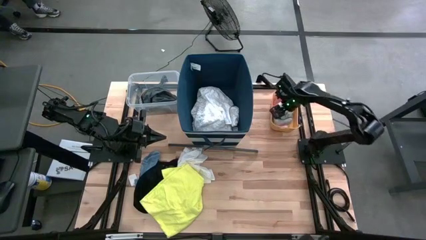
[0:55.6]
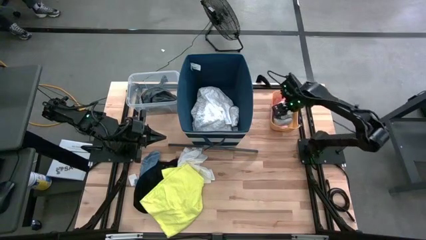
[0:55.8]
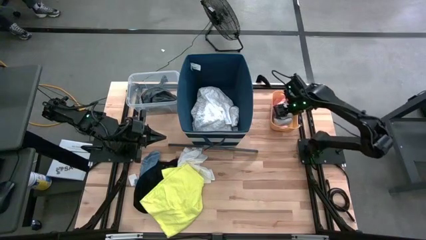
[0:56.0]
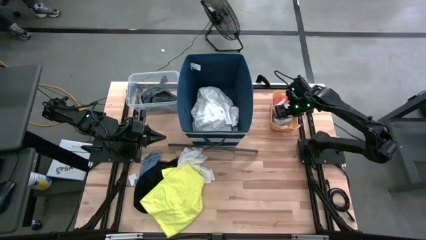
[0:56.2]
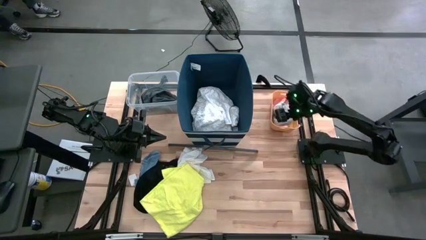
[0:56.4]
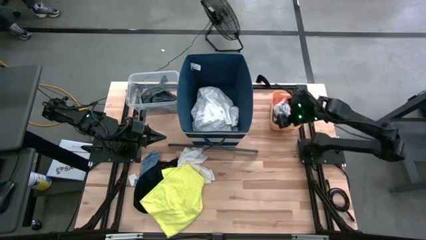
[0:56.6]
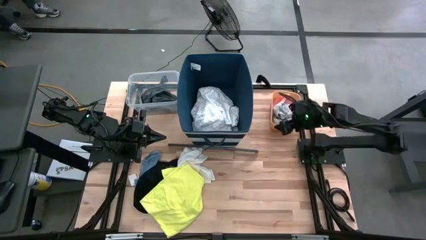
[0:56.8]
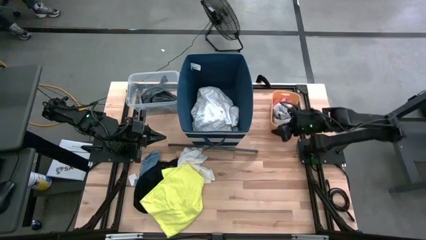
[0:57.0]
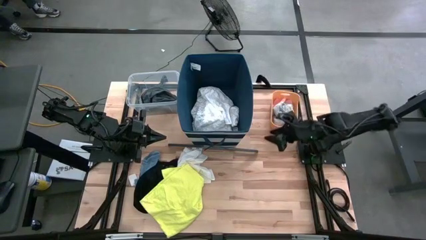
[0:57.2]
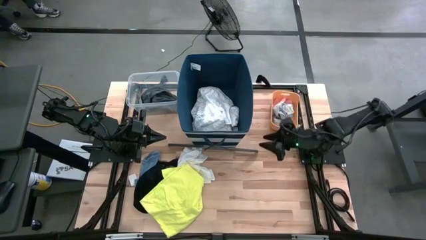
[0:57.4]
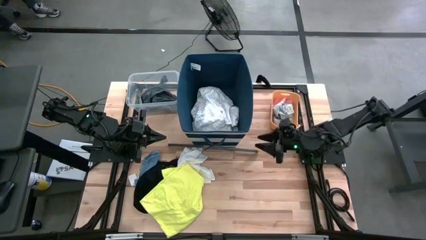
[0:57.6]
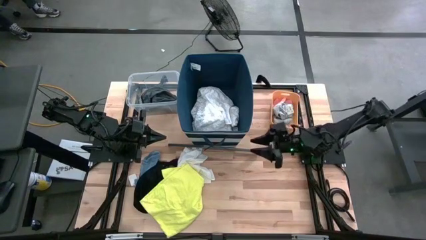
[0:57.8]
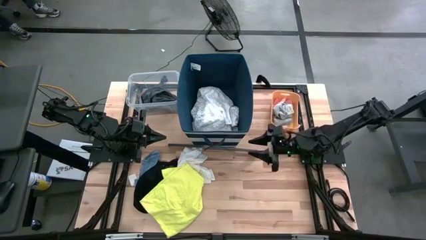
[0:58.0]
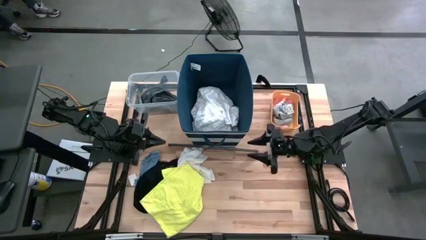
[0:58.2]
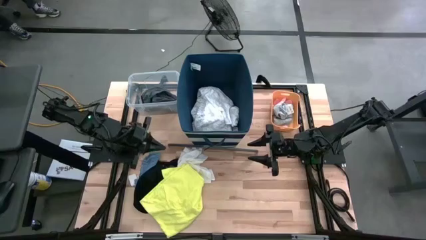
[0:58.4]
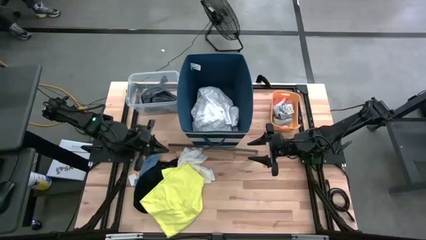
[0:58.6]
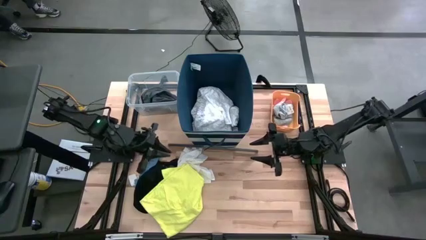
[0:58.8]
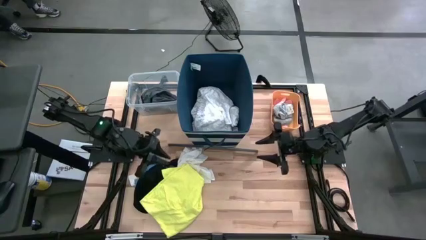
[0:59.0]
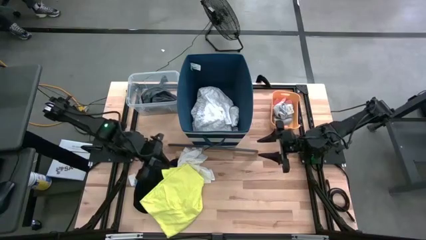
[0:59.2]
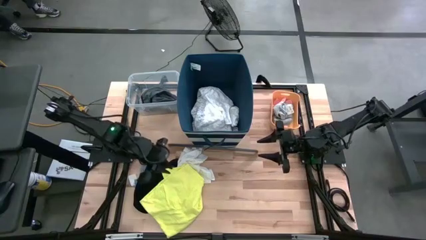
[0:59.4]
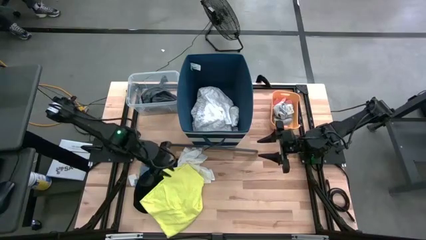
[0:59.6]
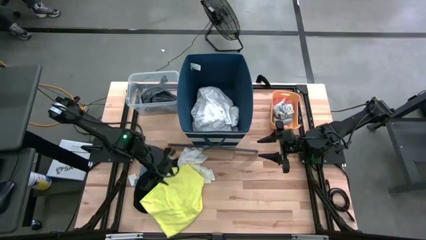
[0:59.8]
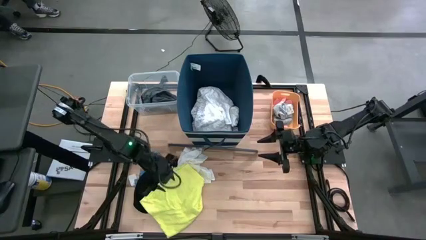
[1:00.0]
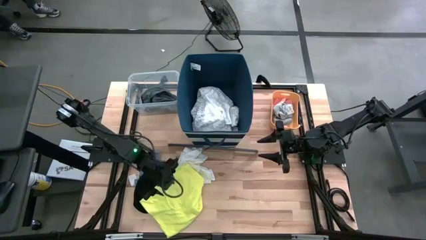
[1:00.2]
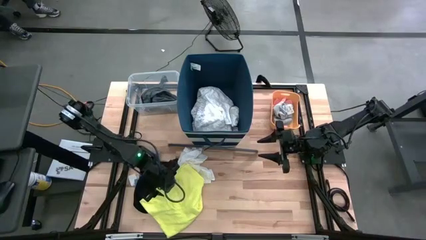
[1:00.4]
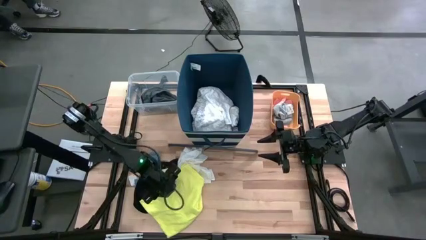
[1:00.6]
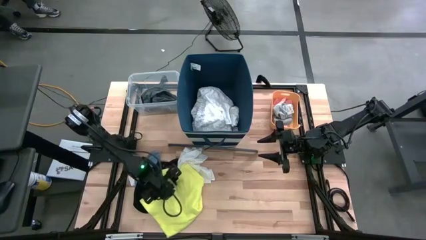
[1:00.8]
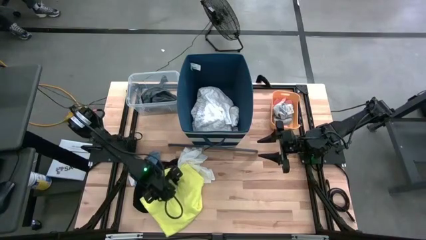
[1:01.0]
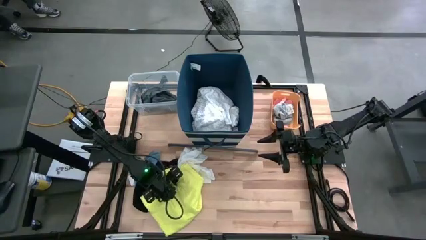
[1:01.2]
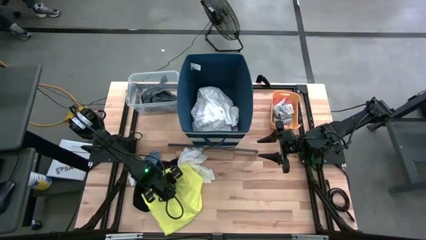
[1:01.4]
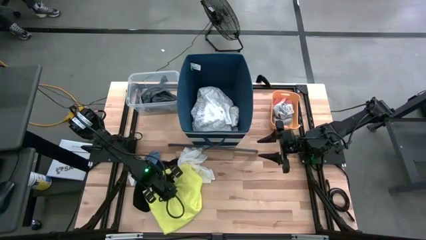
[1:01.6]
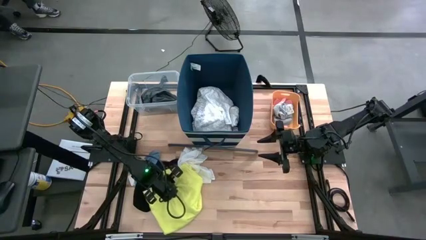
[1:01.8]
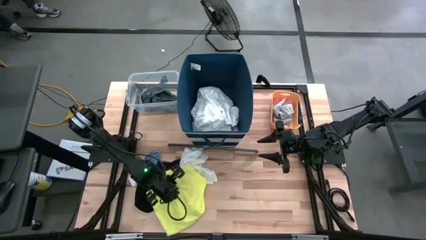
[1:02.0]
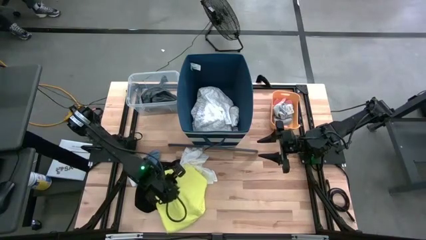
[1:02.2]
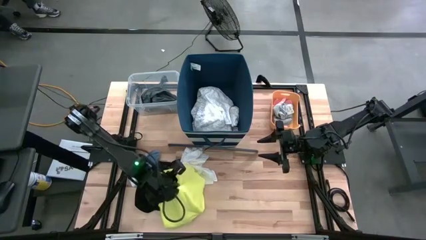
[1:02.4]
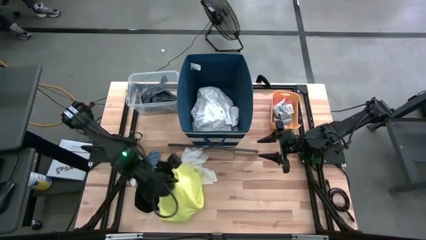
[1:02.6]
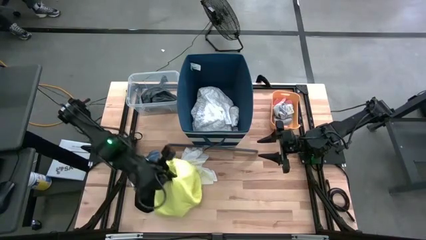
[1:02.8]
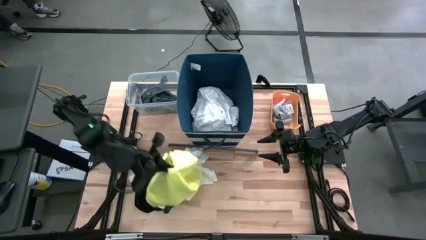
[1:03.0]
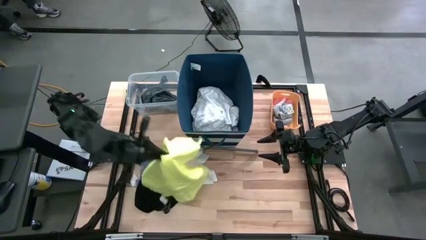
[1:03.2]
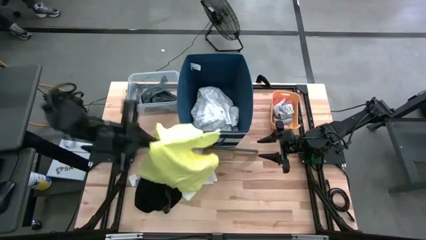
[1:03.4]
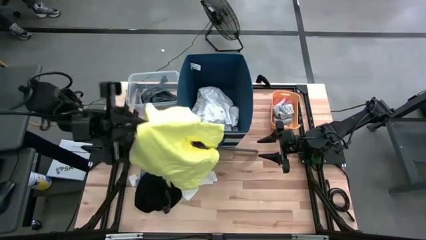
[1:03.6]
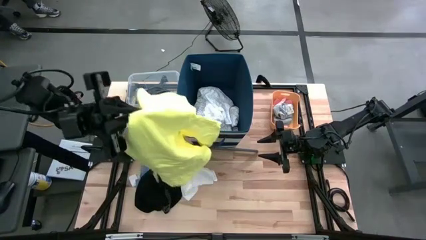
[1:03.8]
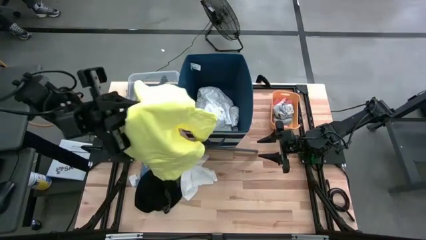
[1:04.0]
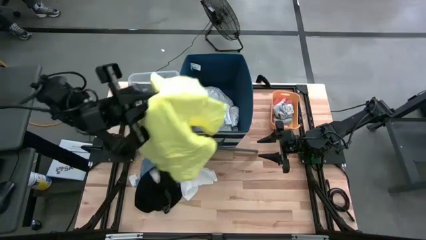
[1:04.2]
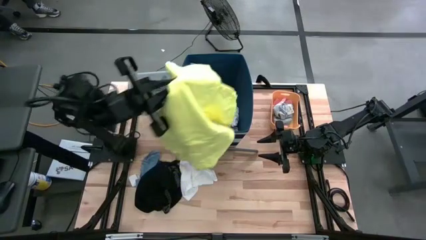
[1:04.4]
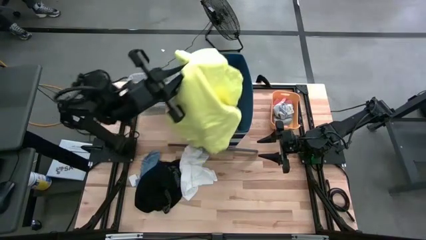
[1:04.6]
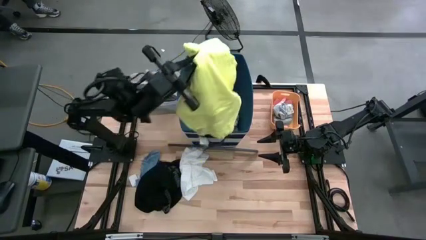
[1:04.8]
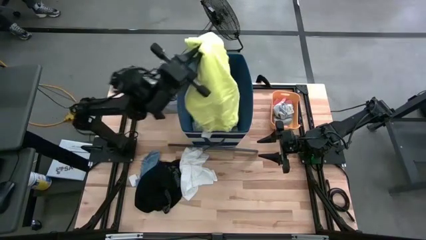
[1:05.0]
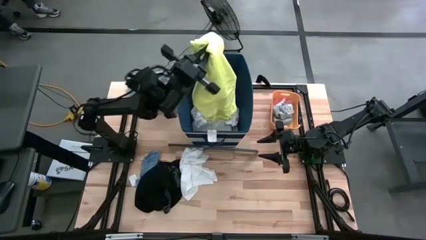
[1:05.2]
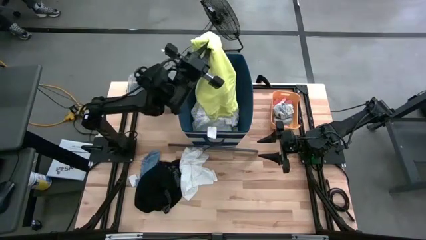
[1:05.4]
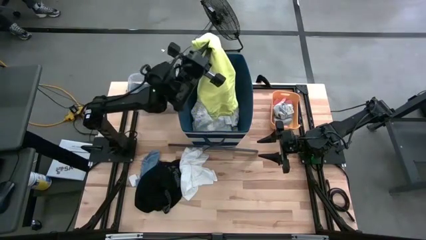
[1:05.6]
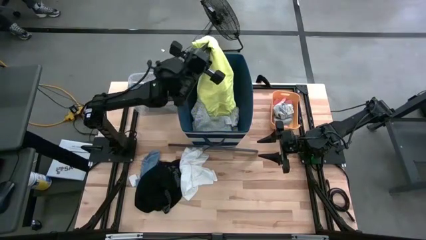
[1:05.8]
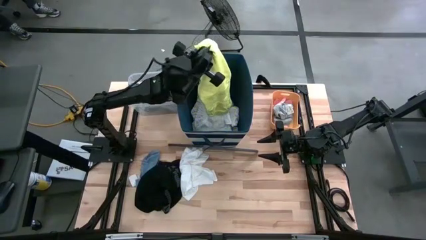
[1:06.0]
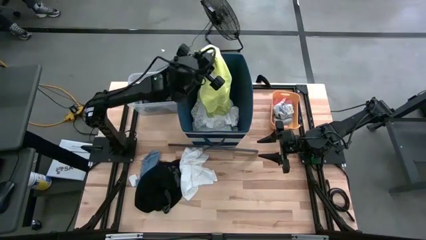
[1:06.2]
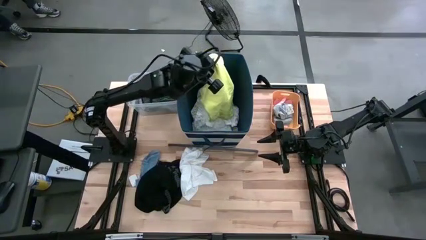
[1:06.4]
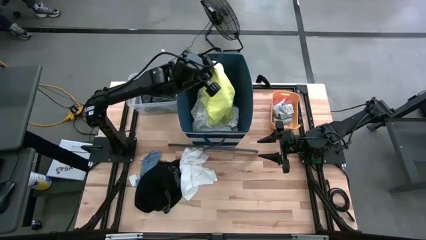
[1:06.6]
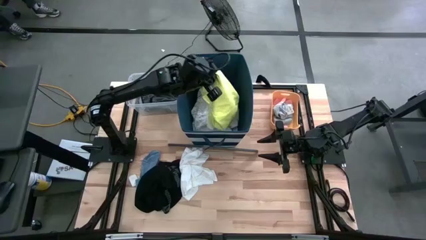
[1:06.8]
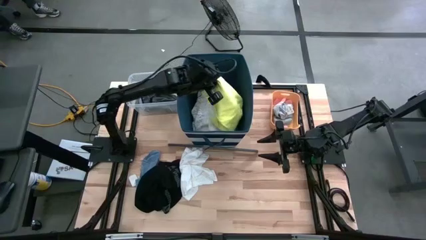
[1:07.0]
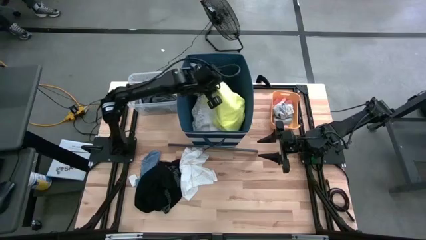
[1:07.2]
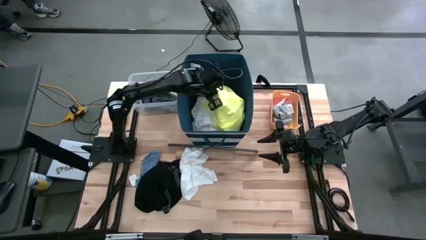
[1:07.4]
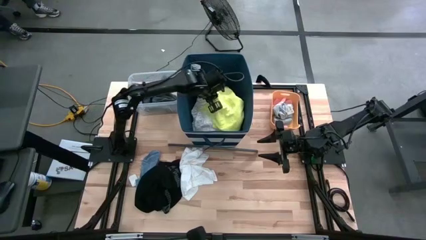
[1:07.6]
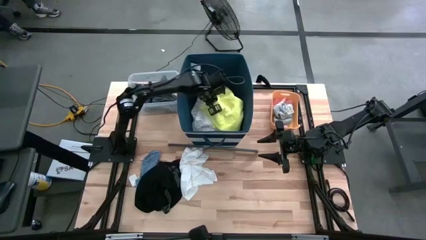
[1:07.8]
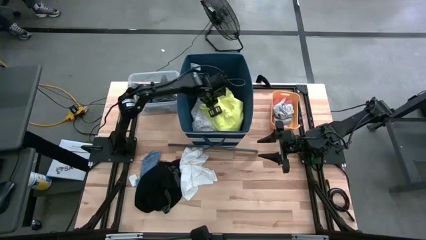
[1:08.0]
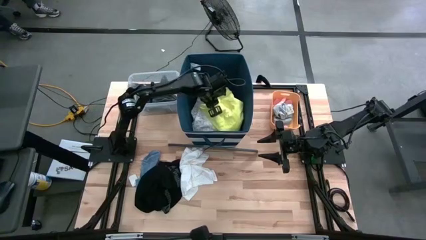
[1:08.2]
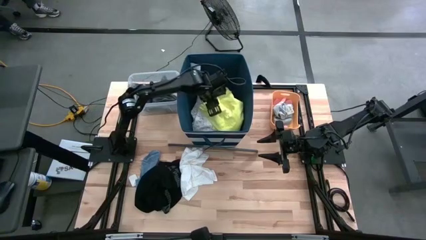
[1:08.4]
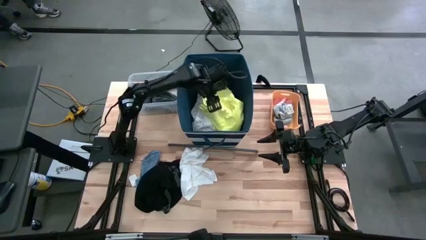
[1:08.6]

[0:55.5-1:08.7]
Task: Pick & Place Cloths
Put the yellow shirt into the blue laundry organizer

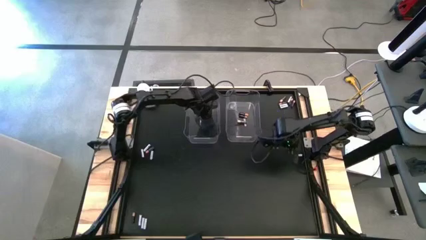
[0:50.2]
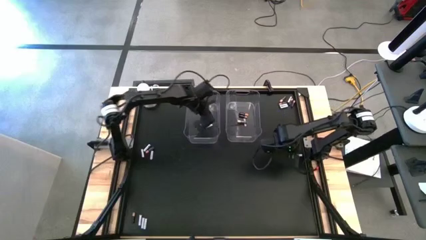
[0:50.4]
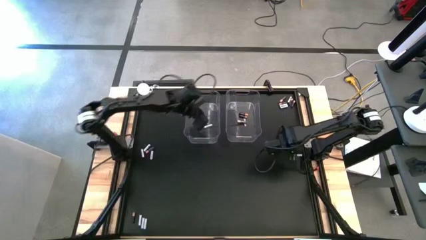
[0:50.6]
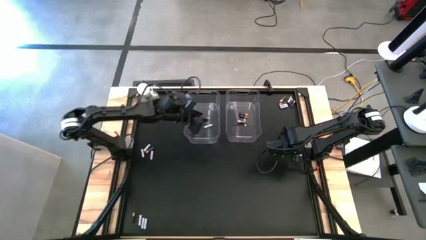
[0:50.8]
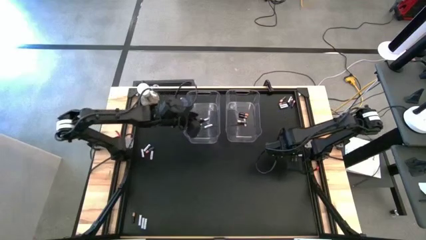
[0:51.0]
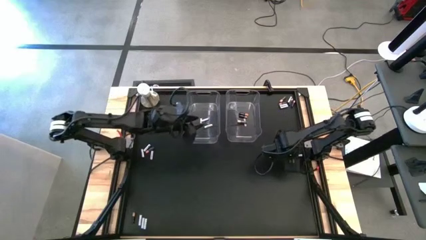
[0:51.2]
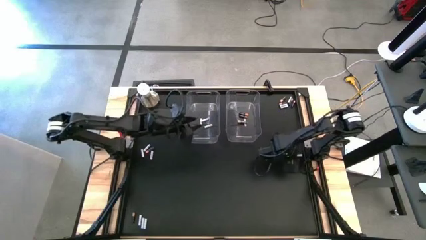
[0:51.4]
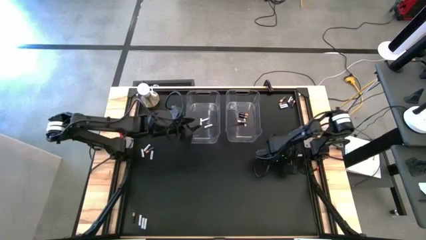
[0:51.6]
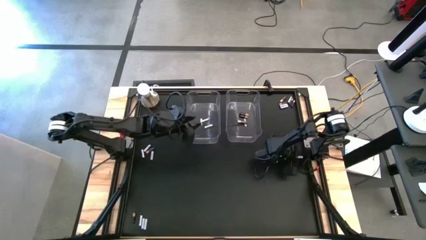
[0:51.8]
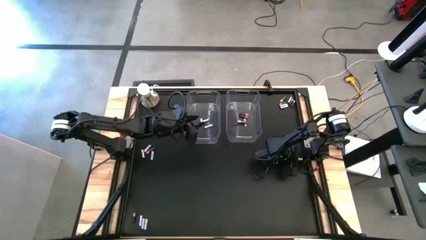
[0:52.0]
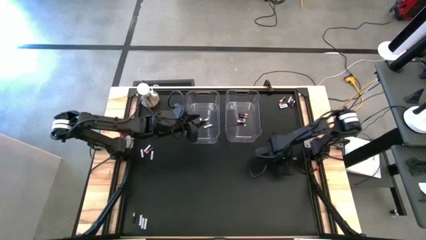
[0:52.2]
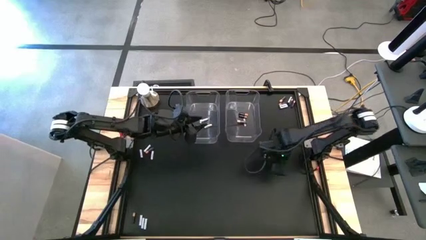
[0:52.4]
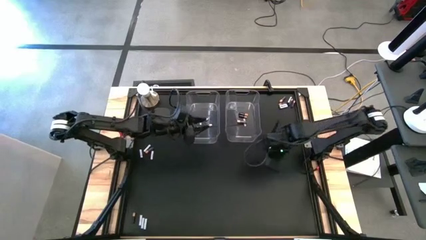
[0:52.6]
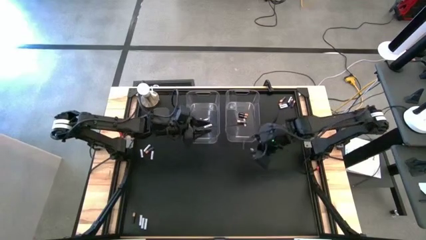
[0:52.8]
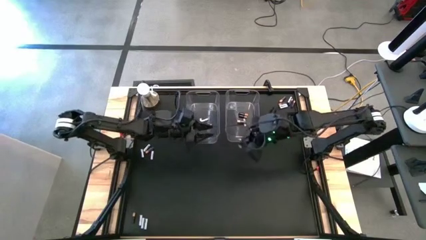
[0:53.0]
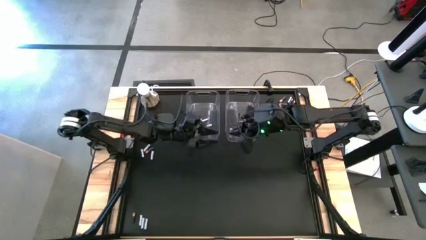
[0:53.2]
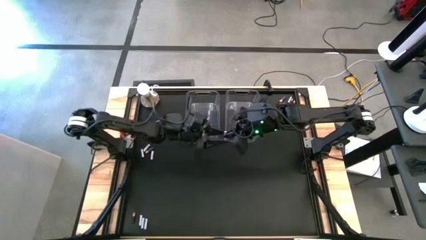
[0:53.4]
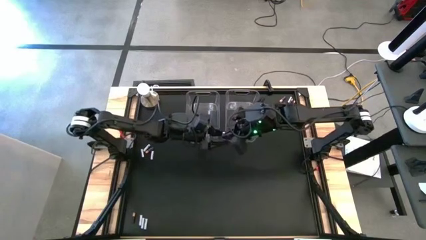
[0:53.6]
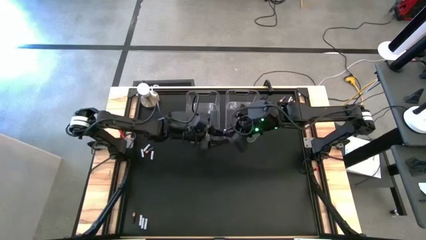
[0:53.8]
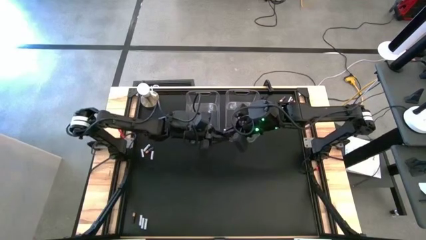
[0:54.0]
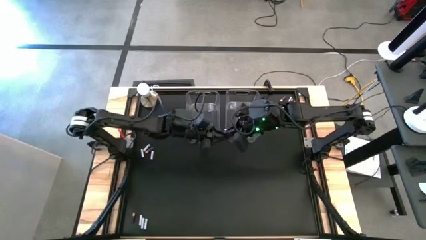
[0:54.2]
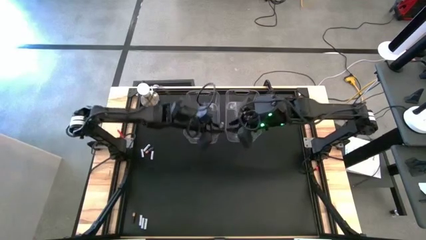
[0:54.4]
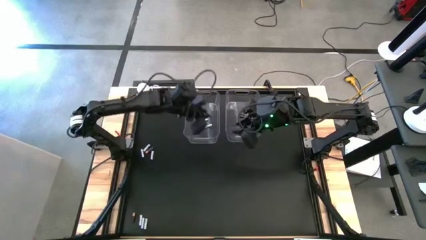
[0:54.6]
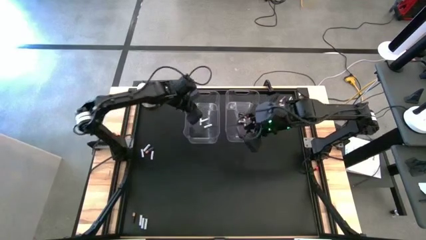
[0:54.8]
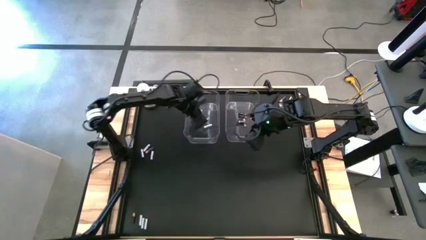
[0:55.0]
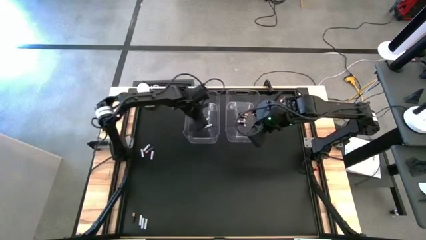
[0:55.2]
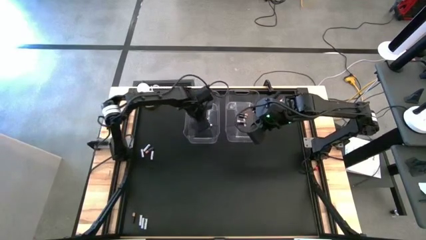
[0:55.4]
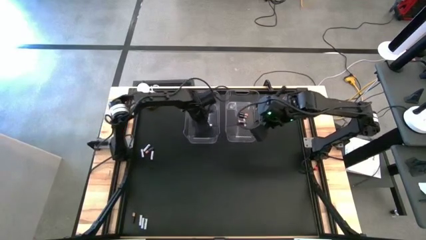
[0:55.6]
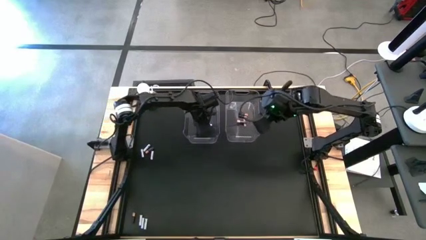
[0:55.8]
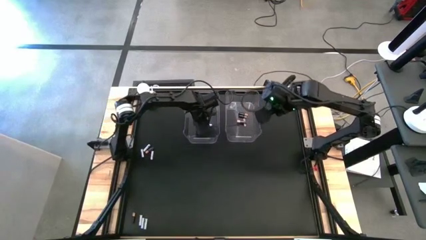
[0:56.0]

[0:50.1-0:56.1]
Task: Sort batteries
Put the white battery into the left transparent bin
